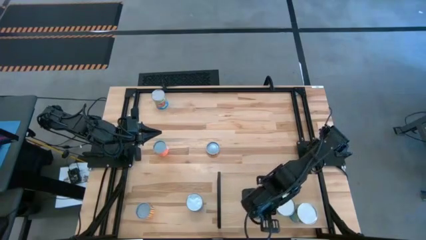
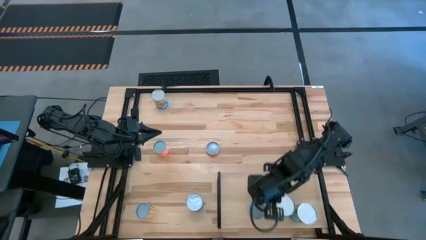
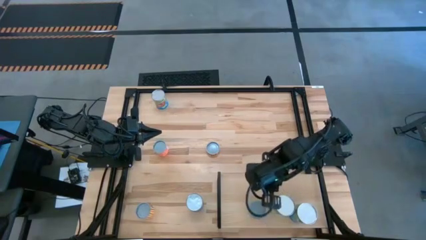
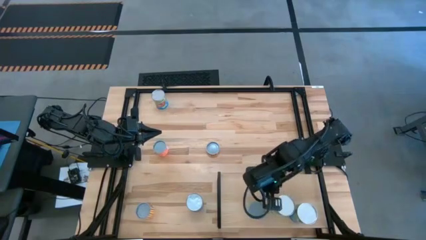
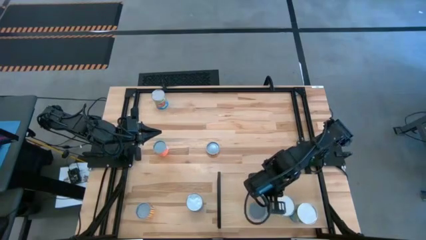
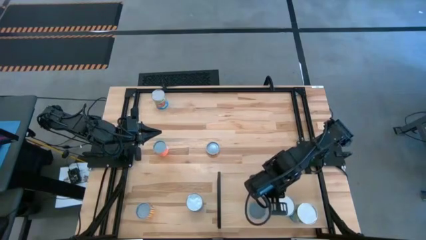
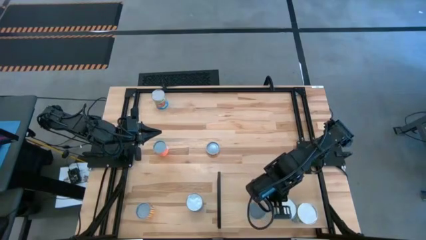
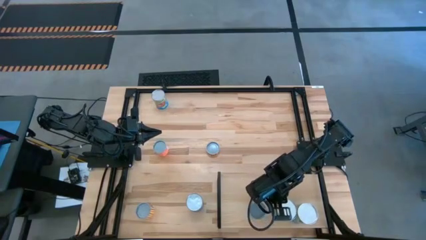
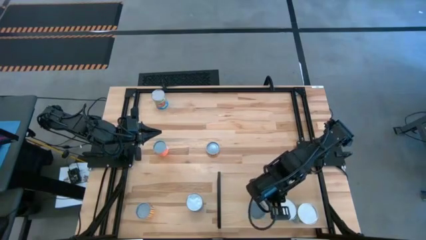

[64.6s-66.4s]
Task: Pick and place cans onto a shelf
Adjust the canned carrots on the shelf

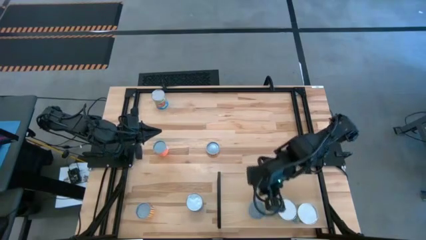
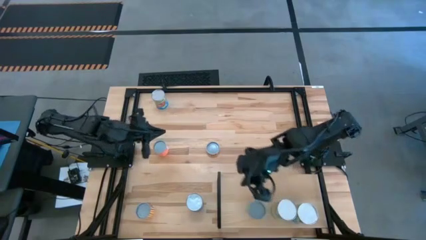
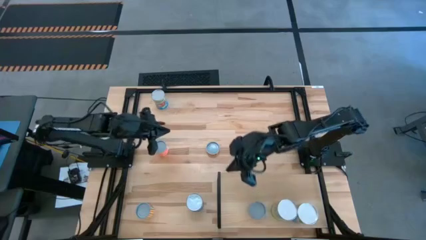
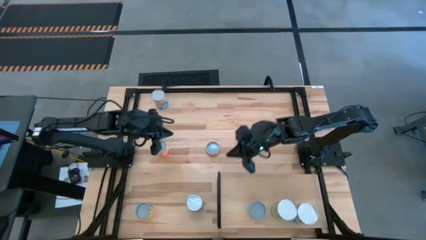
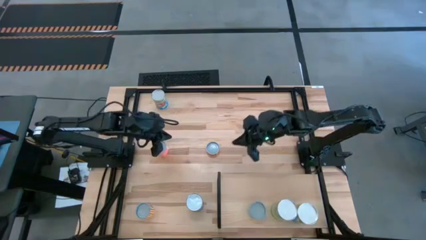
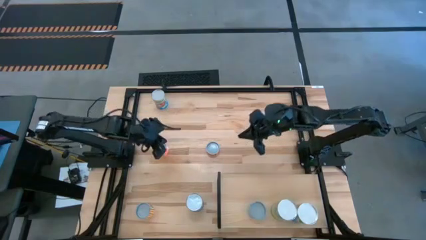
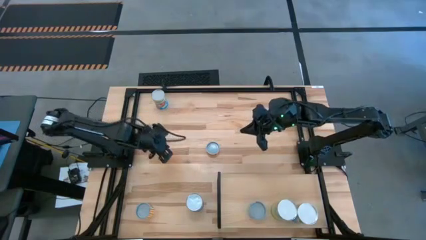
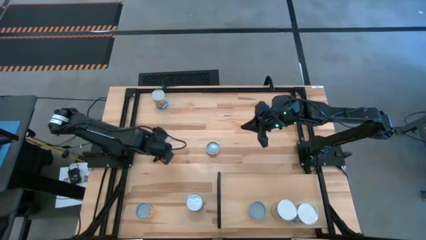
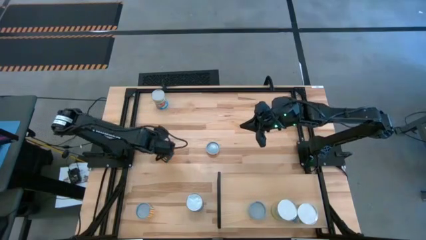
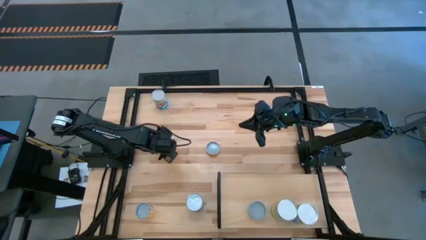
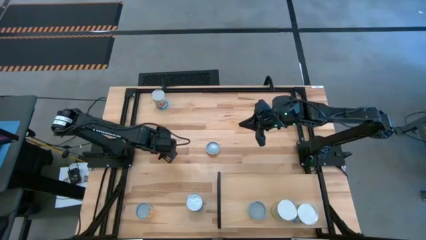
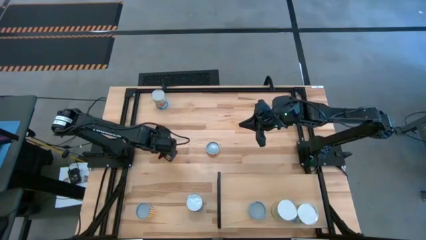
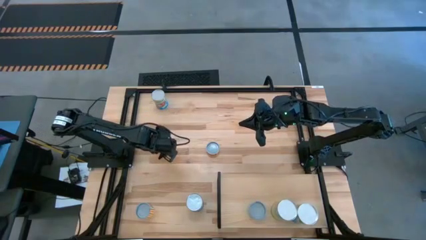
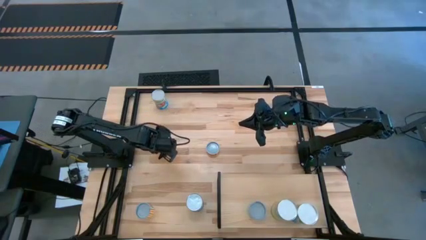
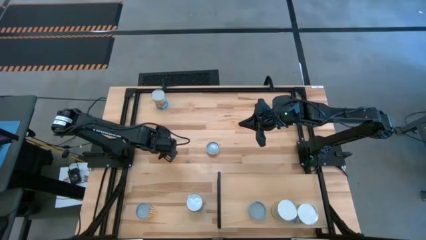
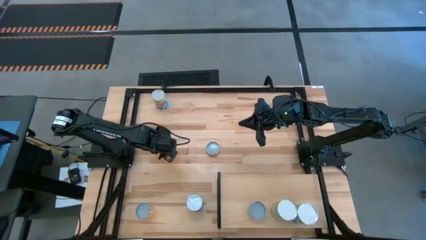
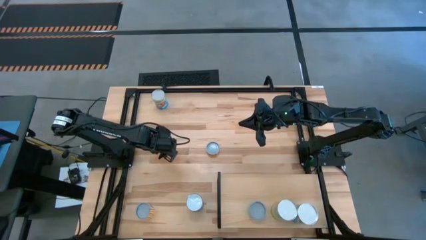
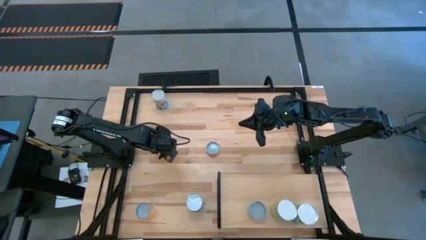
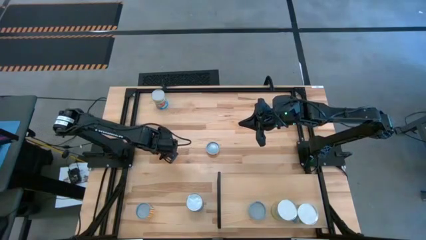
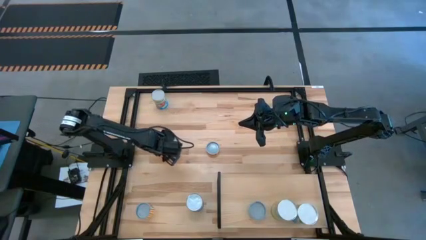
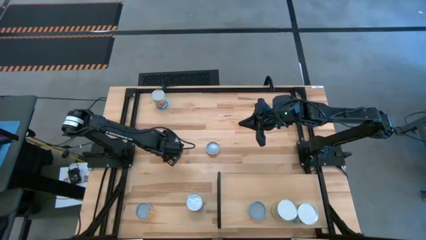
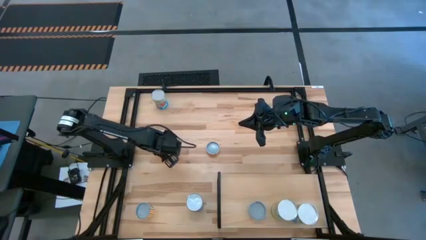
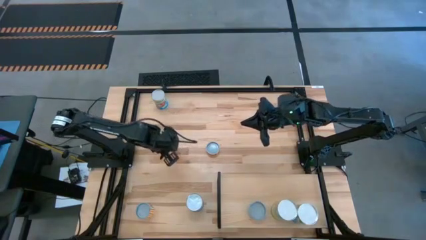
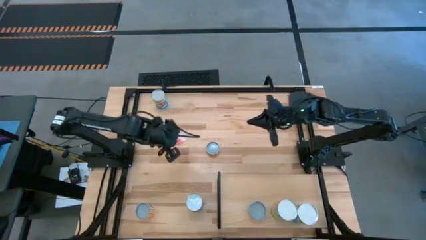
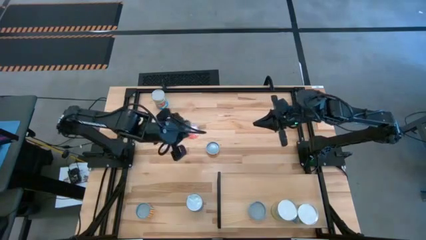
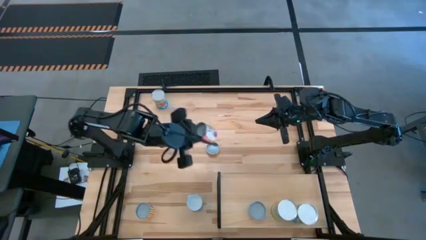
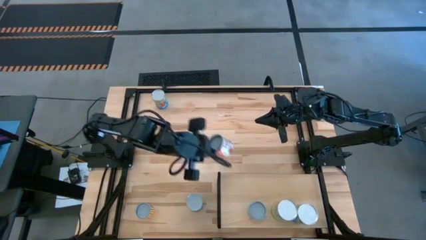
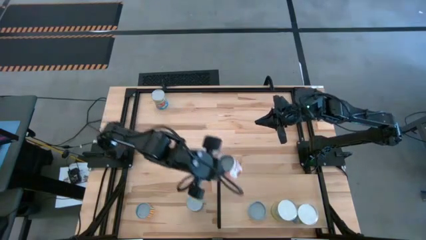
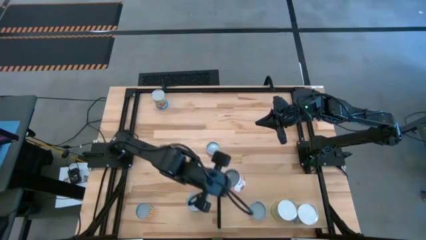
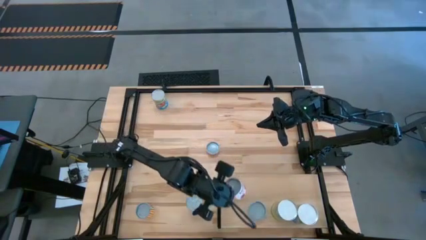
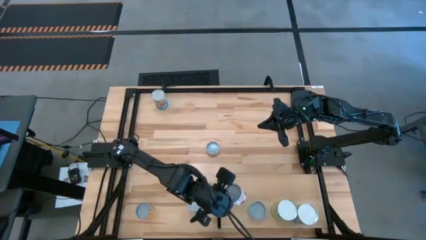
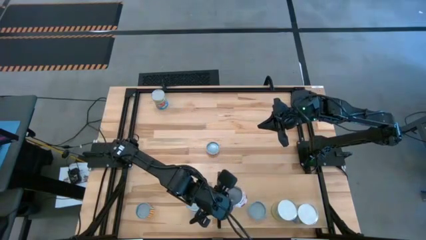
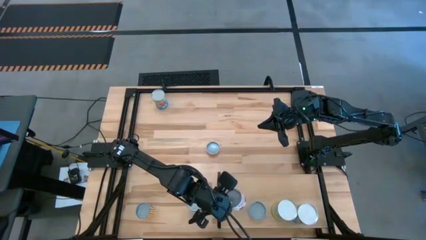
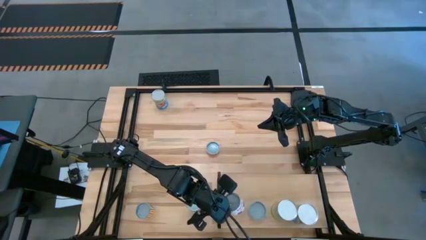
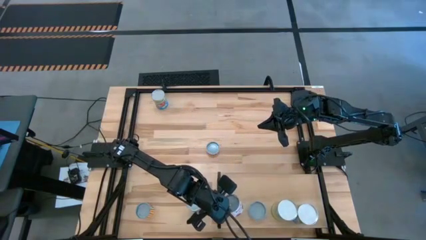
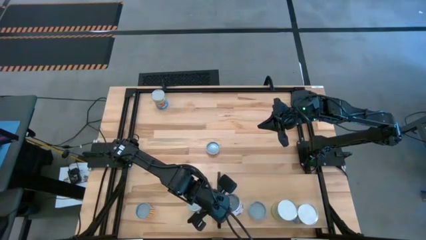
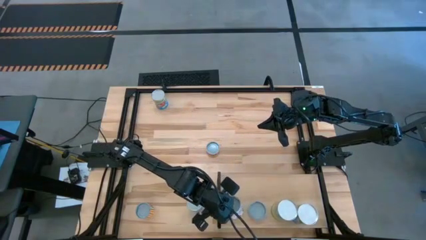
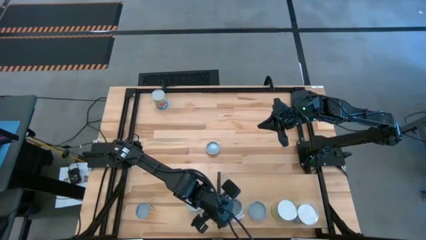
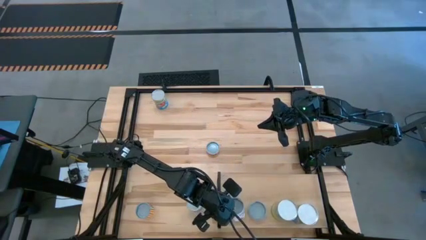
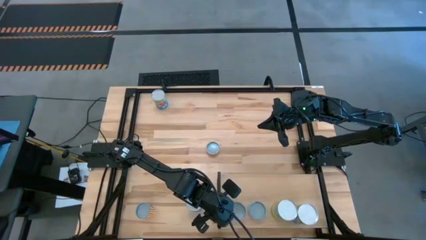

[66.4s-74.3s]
Put the canned meatballs on the shelf

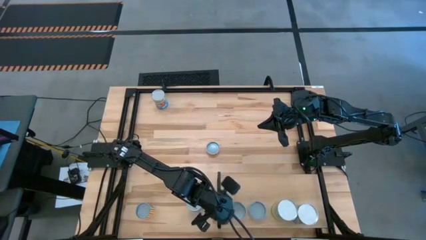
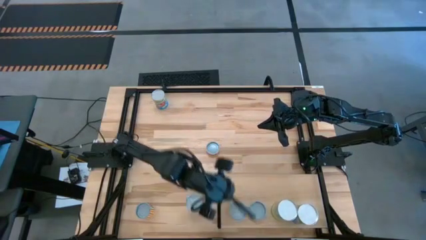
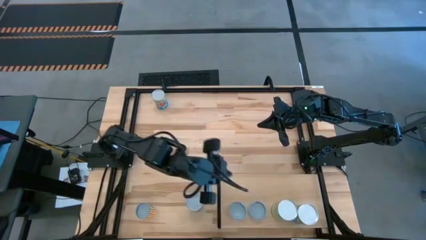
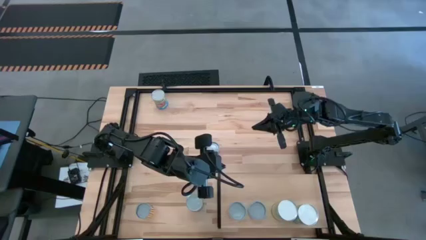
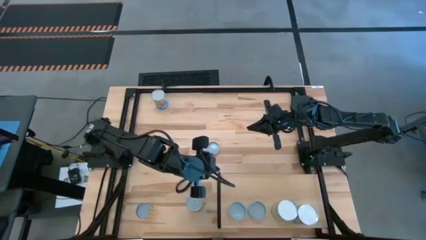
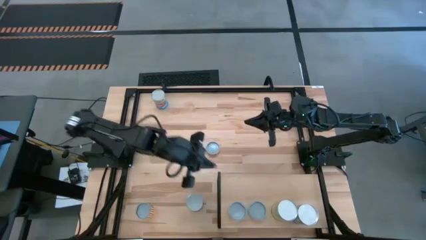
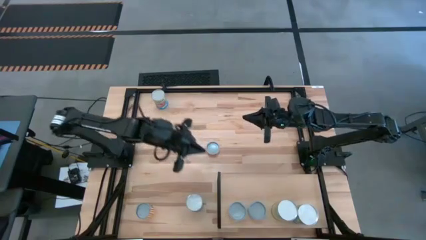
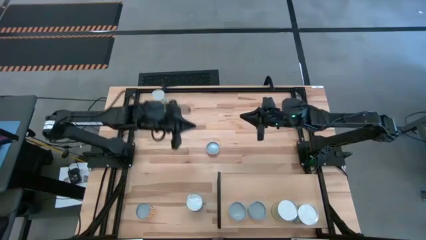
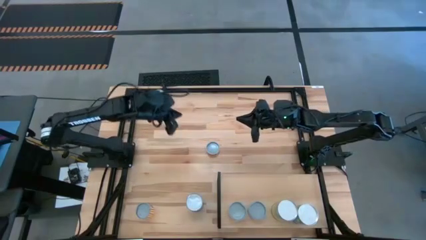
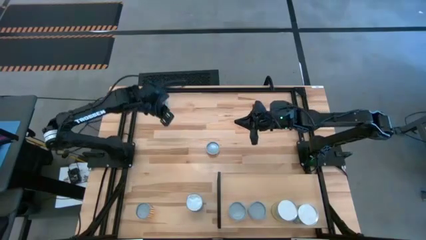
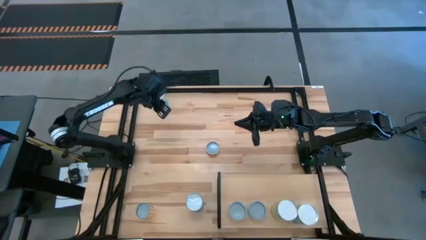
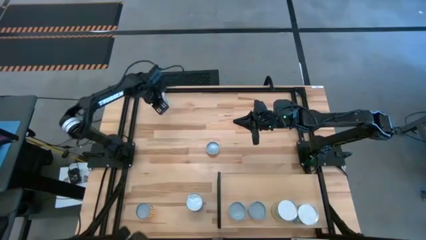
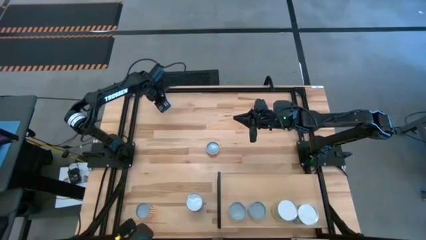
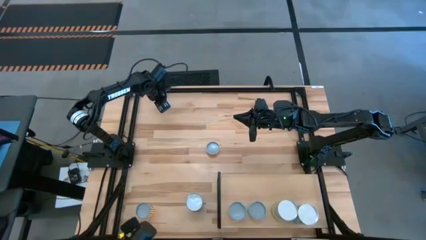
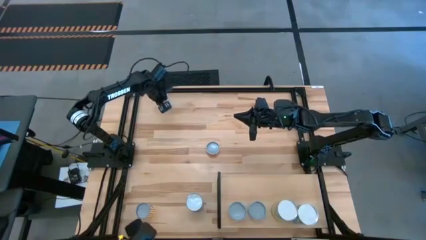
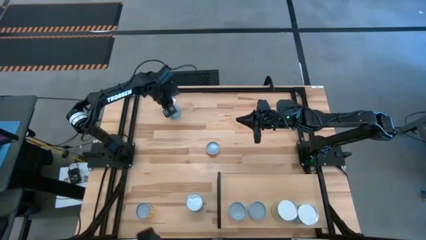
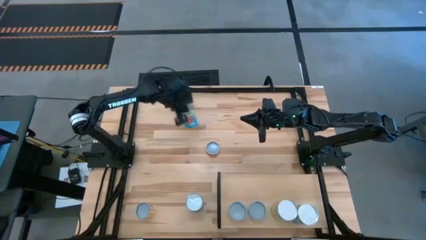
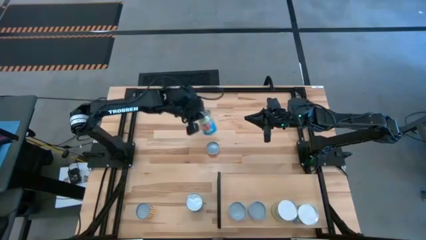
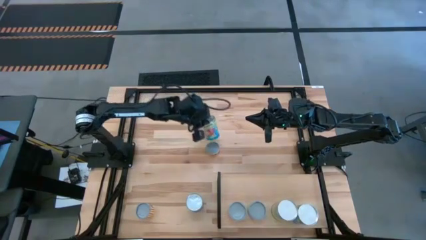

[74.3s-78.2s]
Put the canned tomatoes on the shelf

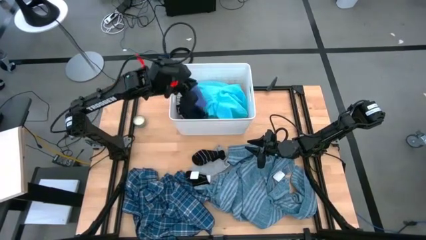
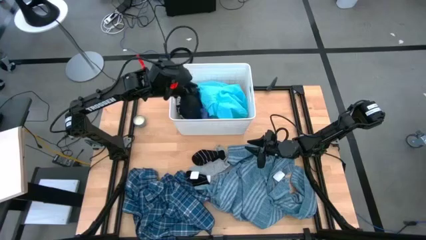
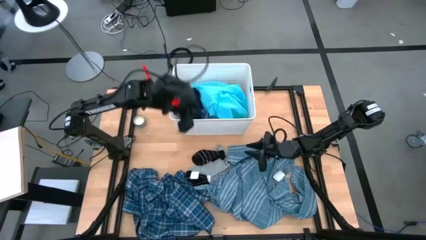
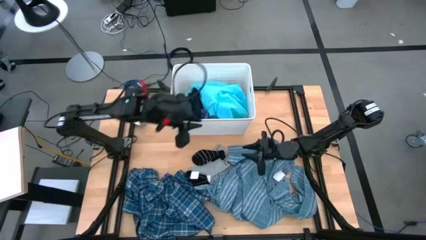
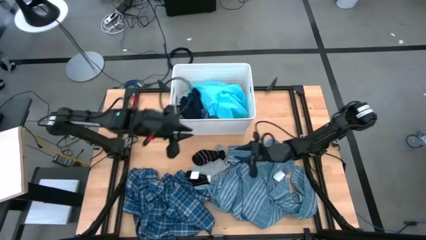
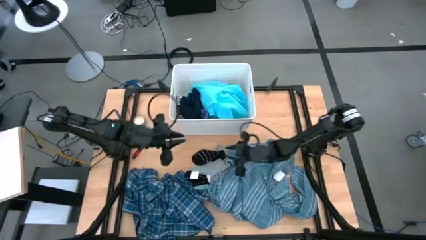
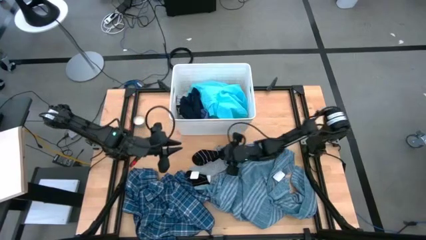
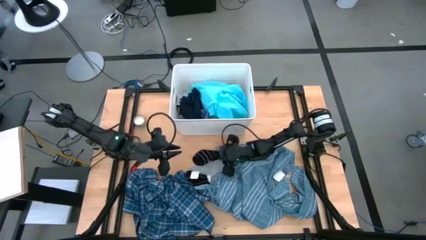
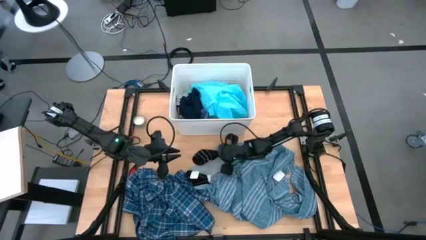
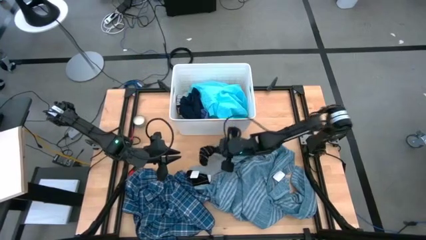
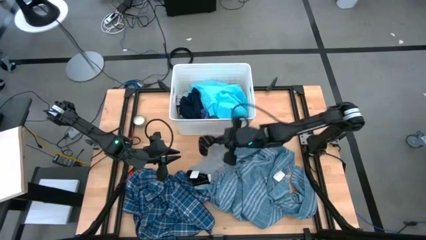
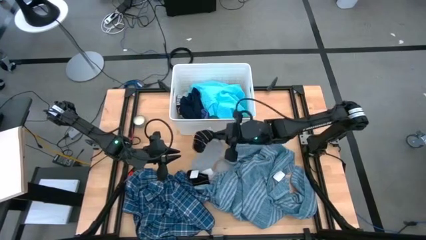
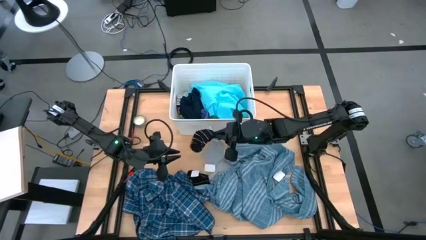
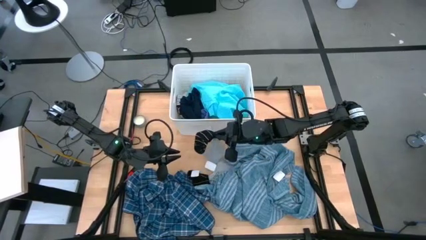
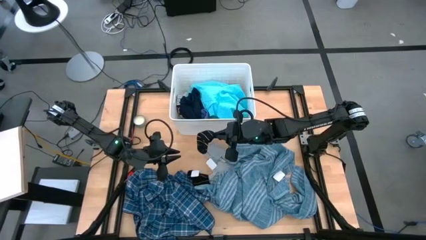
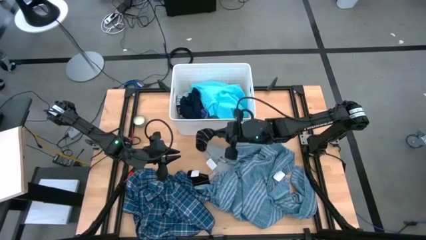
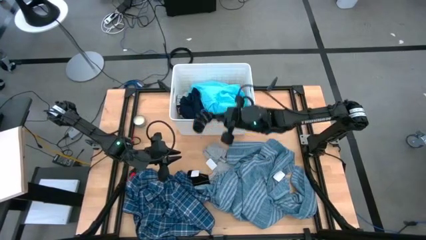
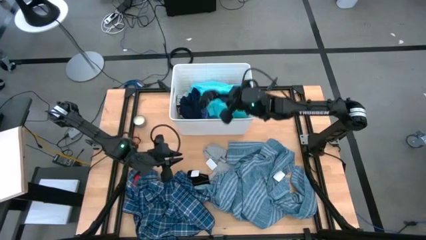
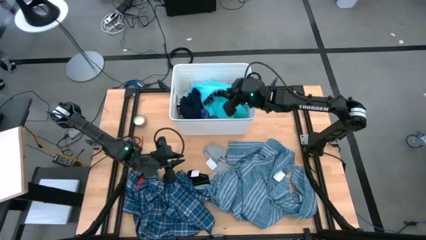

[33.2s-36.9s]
Task: Sort clothes
Put the top black sock into the white bin
